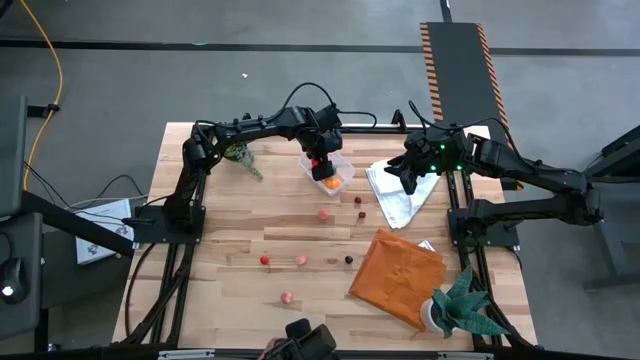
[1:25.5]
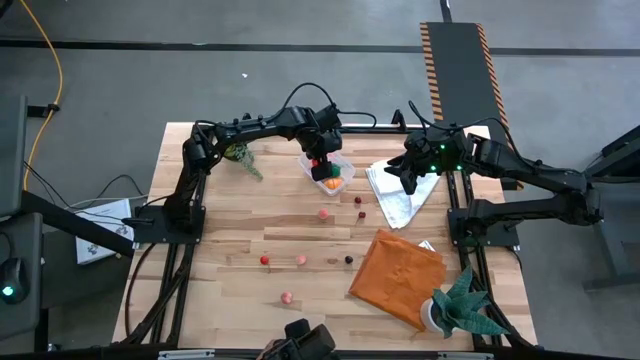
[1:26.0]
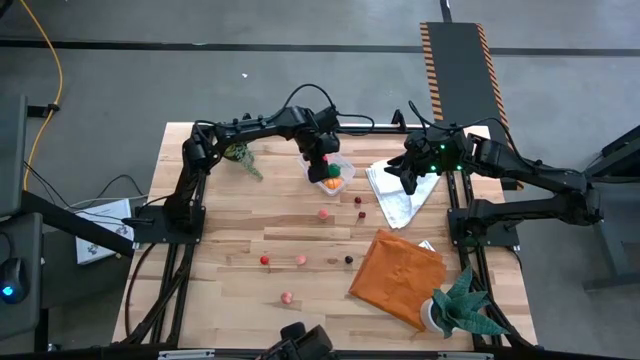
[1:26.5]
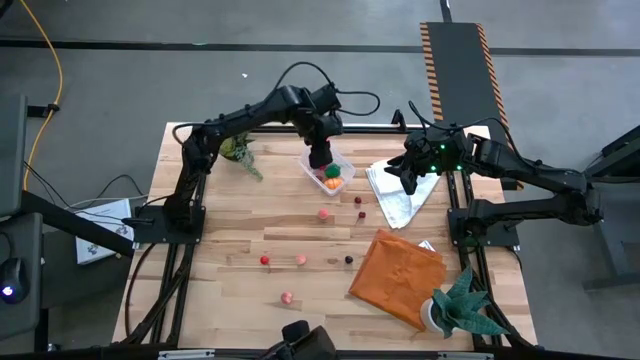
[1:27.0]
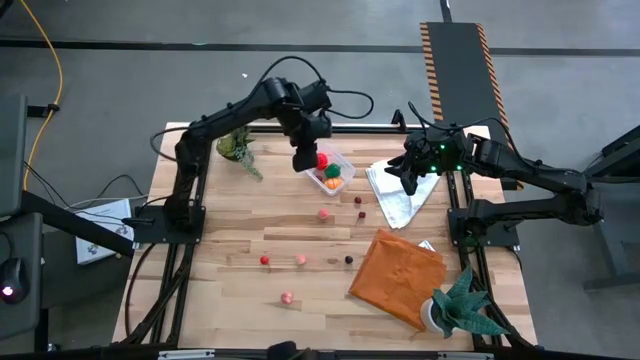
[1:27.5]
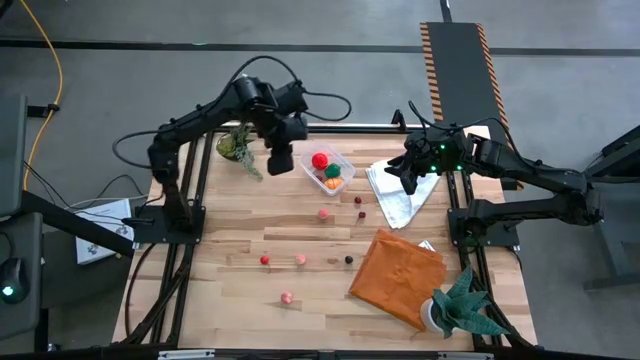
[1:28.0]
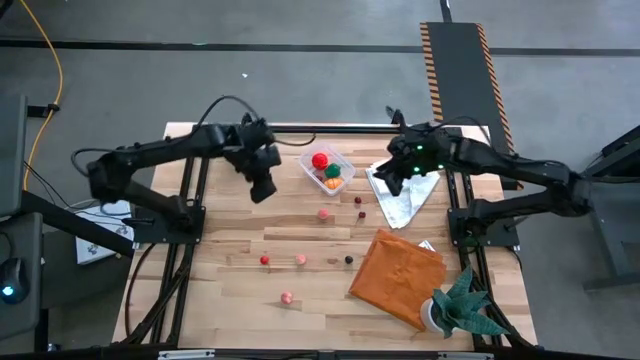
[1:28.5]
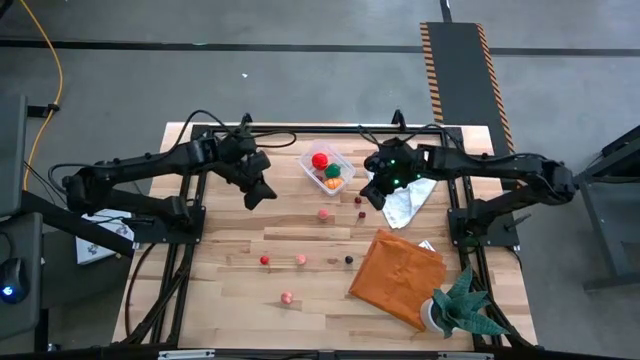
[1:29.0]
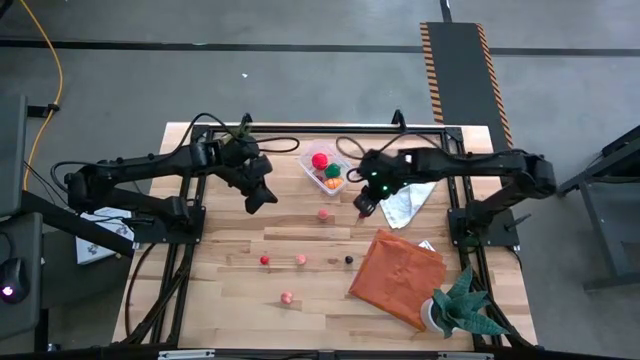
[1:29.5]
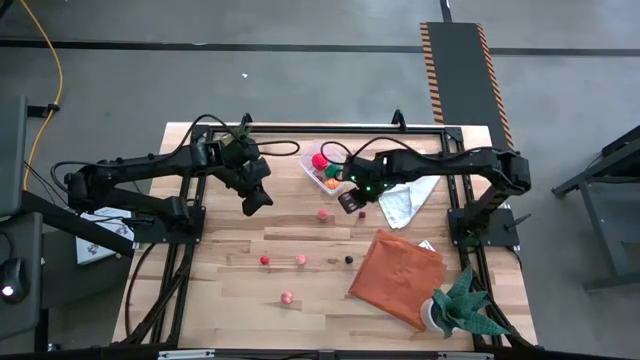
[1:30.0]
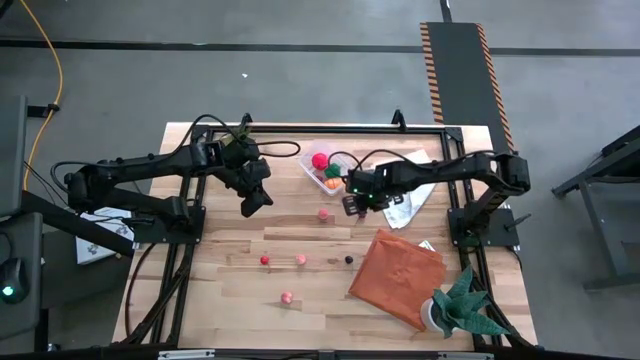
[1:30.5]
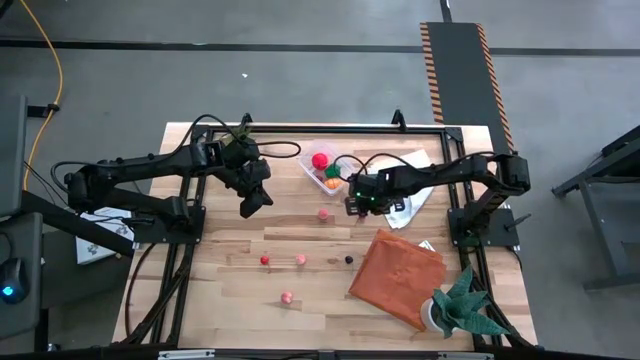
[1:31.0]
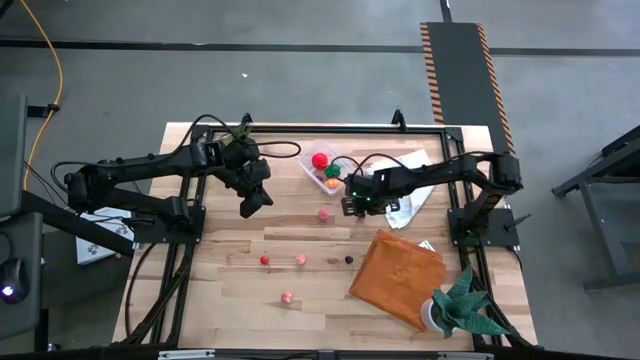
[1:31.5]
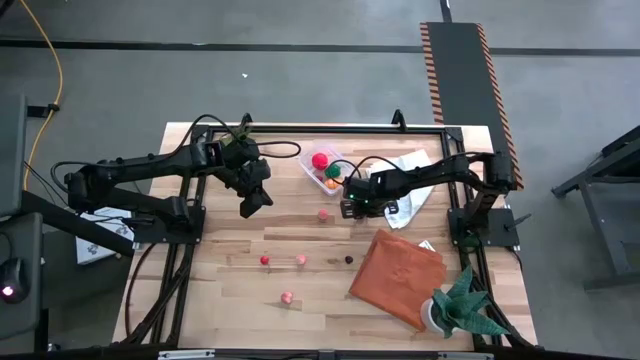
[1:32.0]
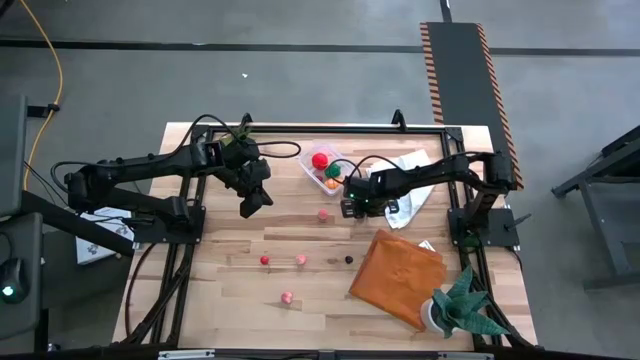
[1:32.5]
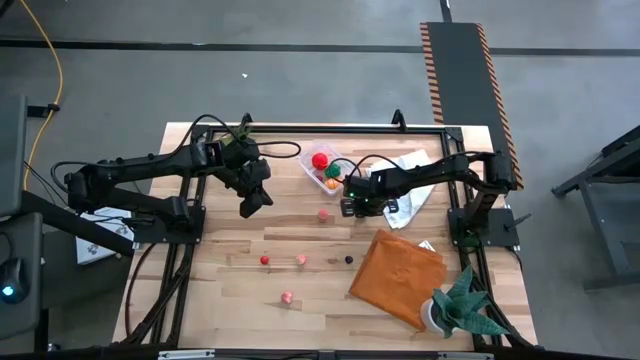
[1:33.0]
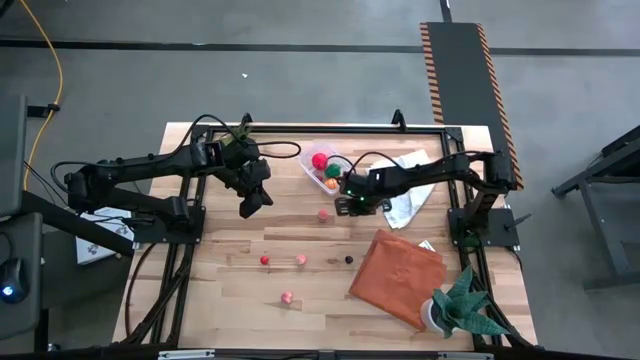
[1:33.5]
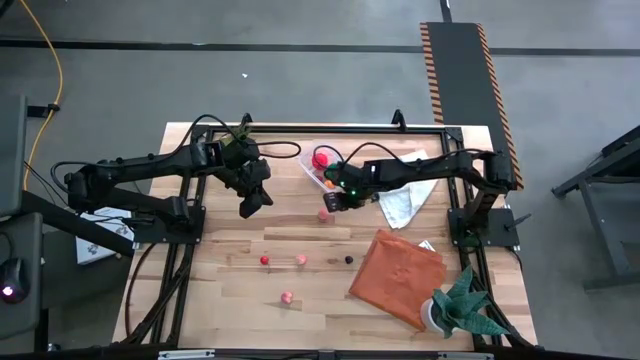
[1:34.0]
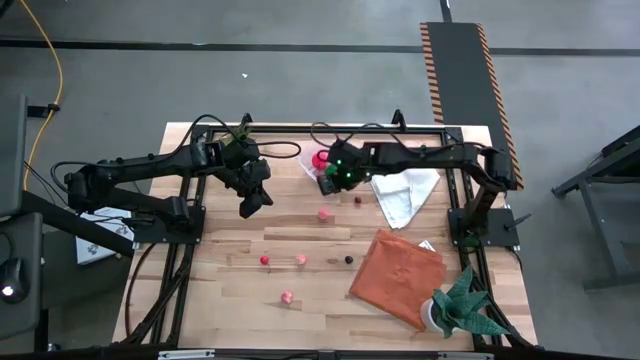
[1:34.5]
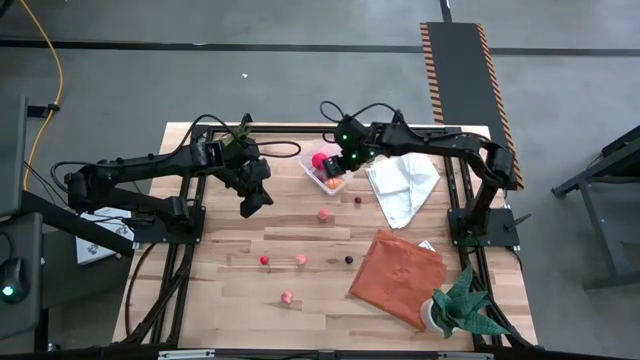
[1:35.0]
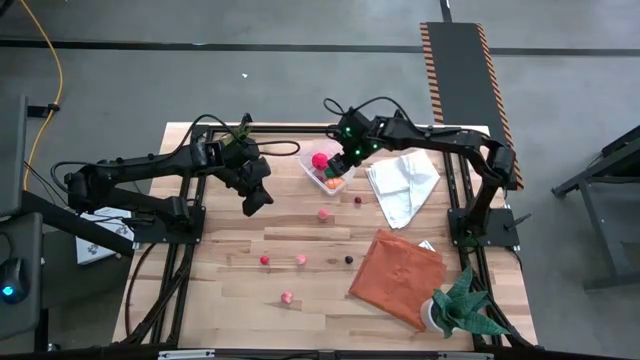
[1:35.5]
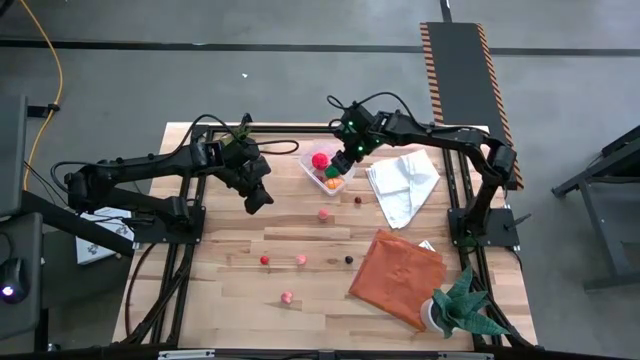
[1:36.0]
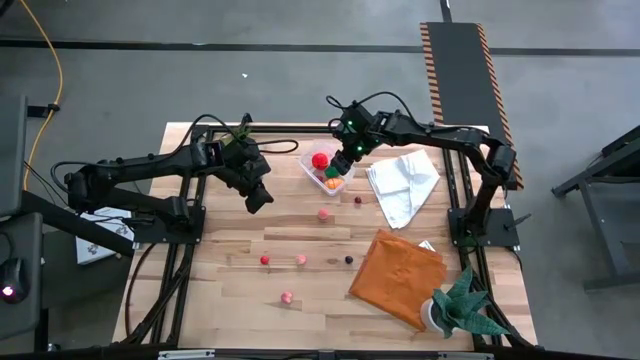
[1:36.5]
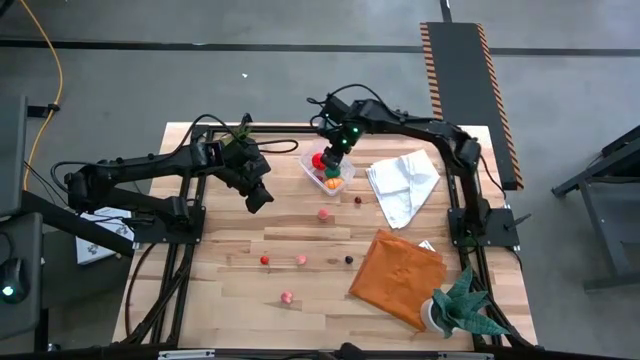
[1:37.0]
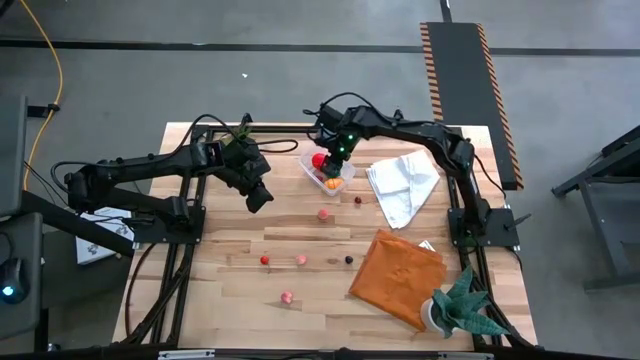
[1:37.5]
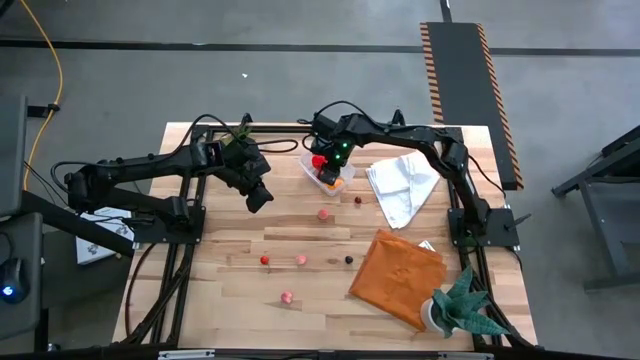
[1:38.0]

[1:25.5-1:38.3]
Task: Pick and placing Produce into tupperware
Put the bottom dark red cherry into the transparent bin

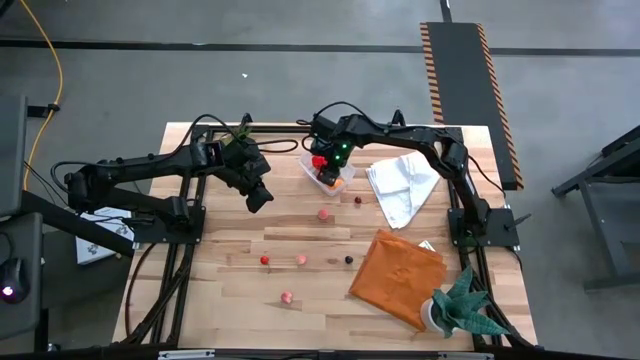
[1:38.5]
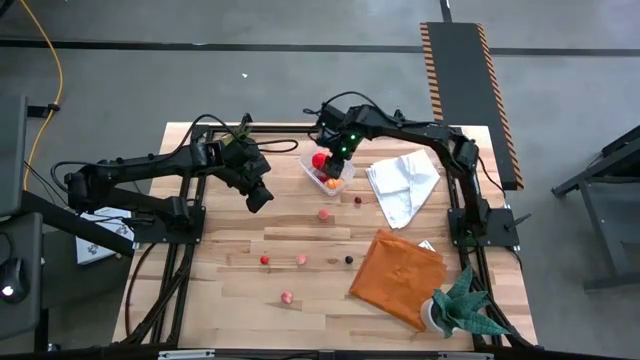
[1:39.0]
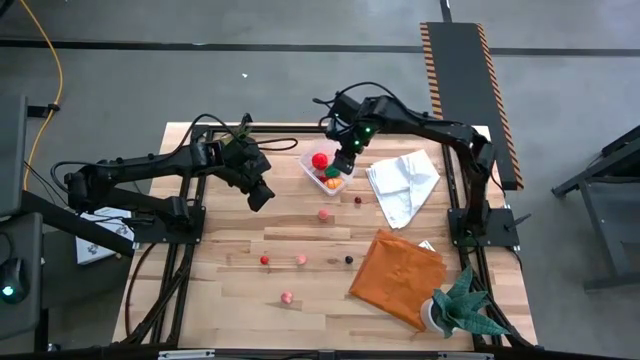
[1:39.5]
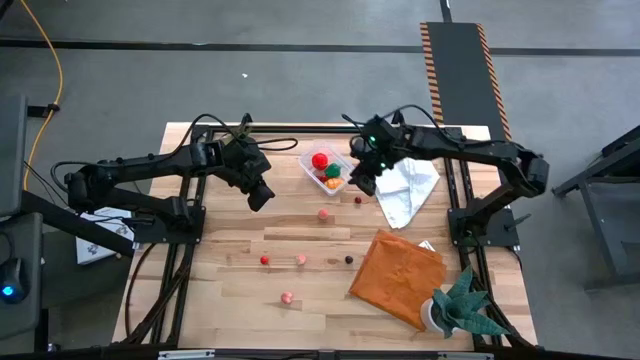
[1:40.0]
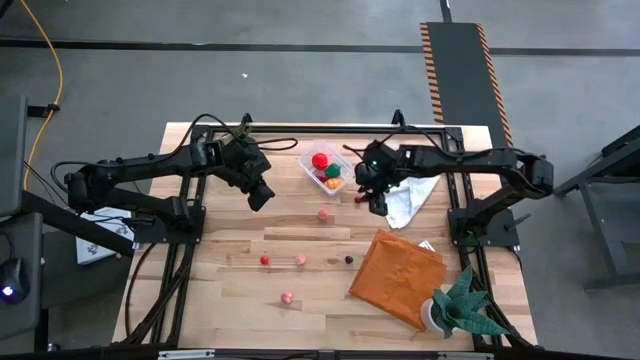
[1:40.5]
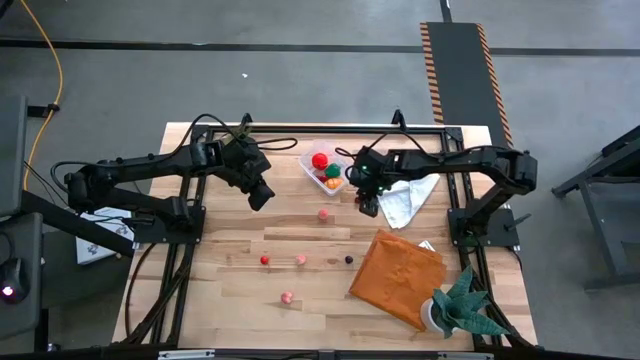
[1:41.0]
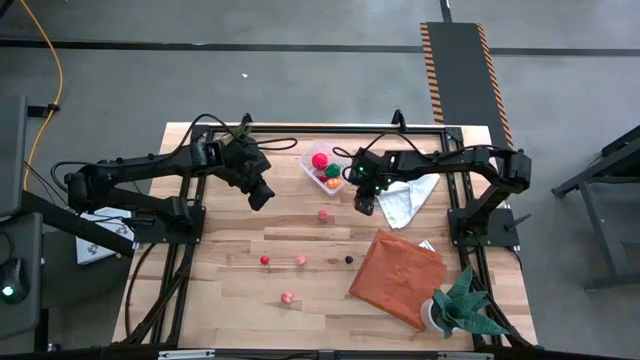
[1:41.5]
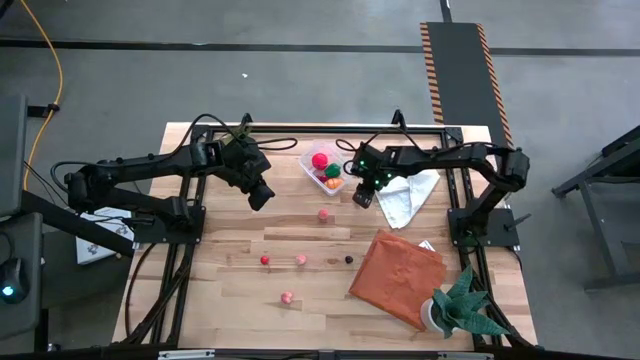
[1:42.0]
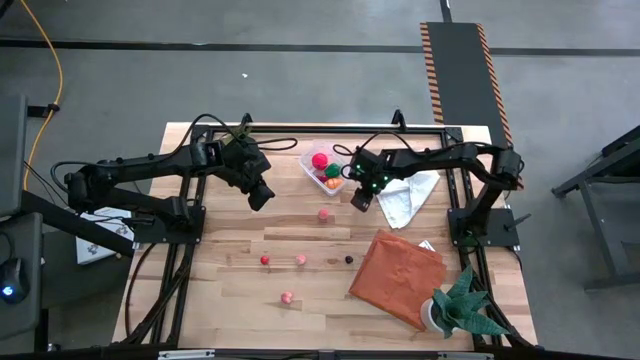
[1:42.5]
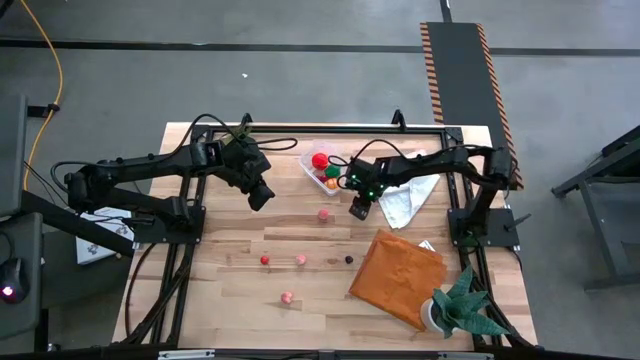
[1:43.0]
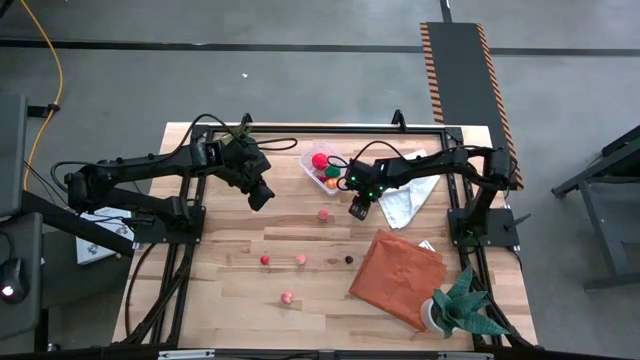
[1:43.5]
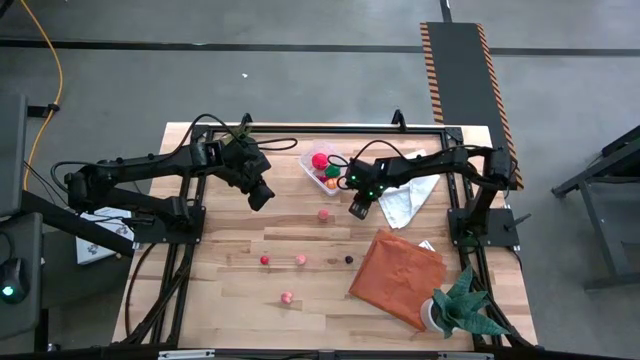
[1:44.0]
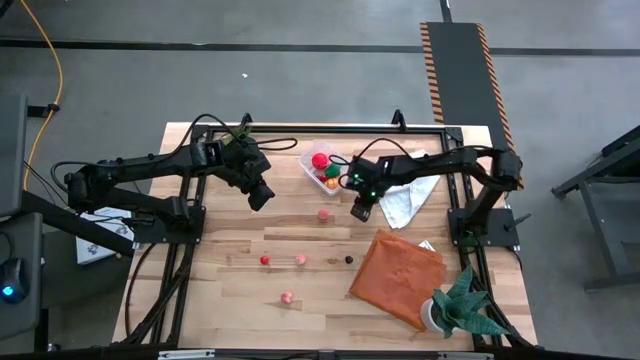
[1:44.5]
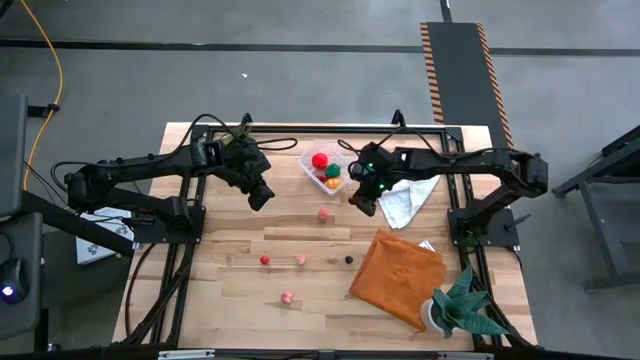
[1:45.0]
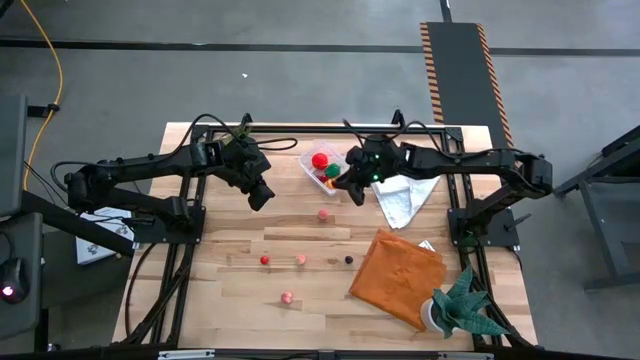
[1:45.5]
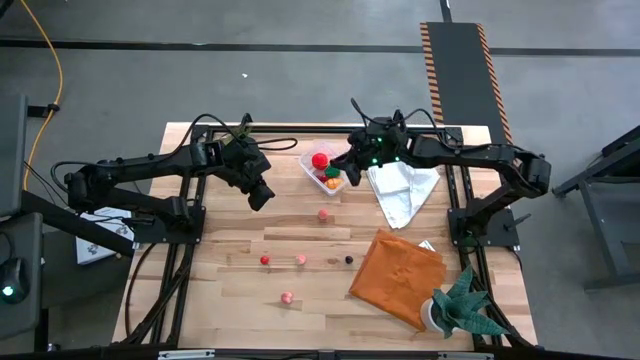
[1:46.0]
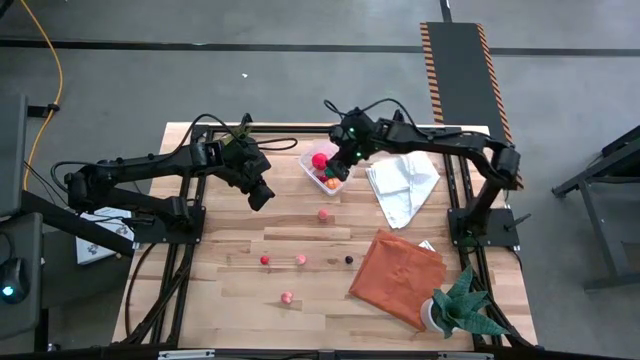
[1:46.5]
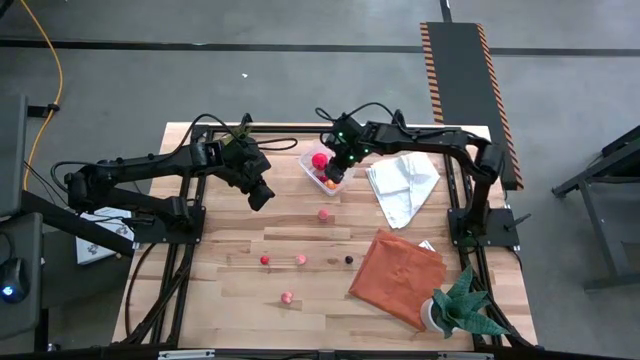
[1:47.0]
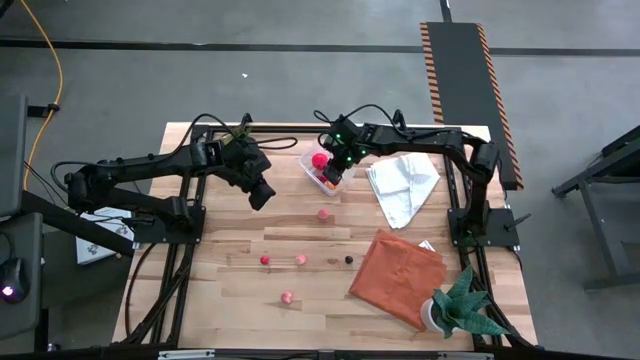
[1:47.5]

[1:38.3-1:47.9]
Put the dark red cherry into the transparent bin
